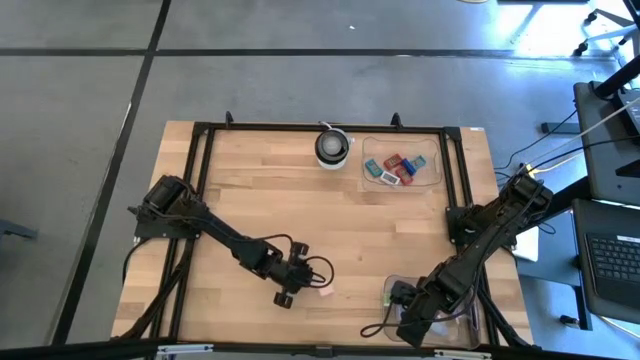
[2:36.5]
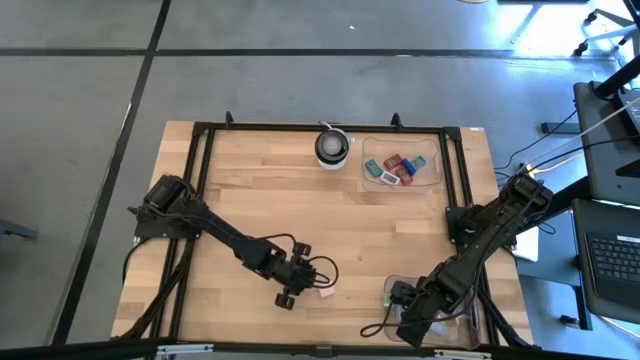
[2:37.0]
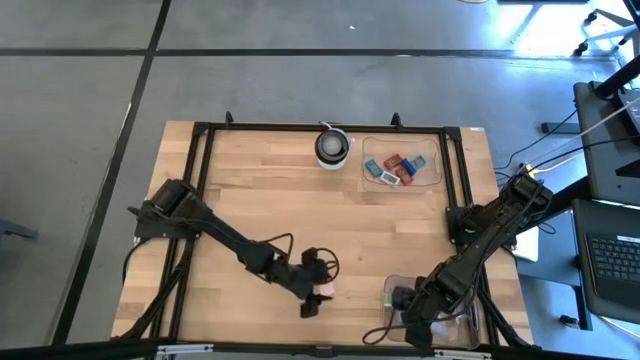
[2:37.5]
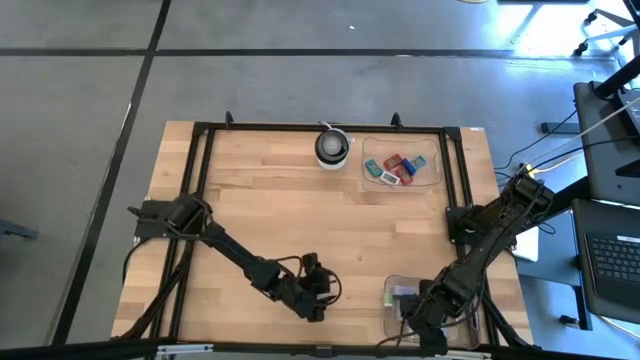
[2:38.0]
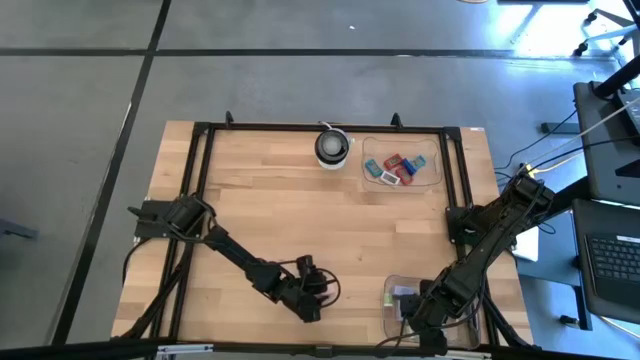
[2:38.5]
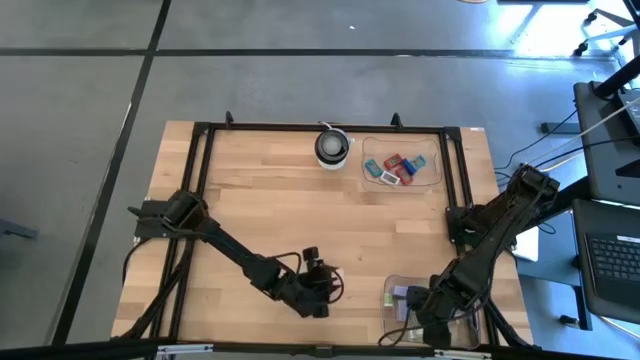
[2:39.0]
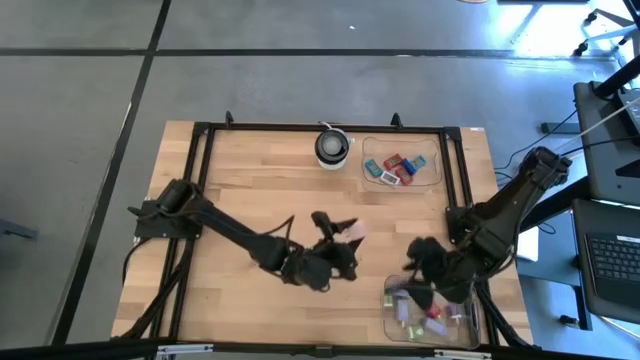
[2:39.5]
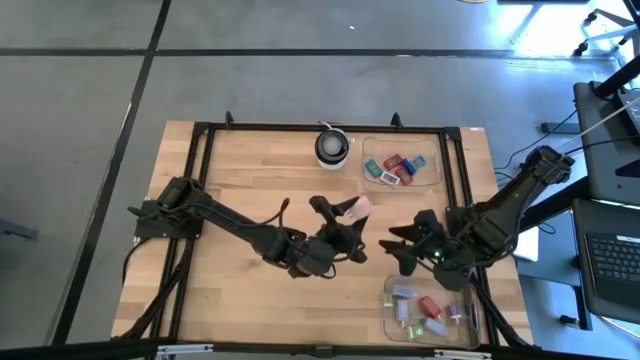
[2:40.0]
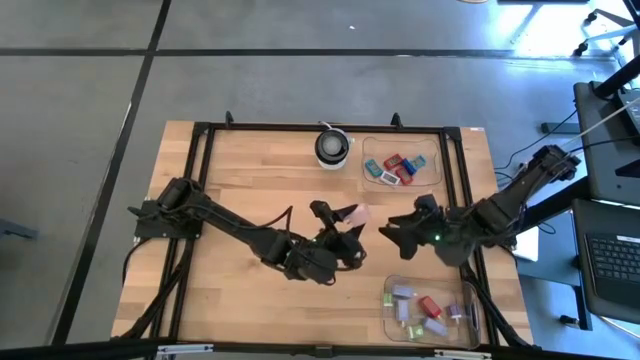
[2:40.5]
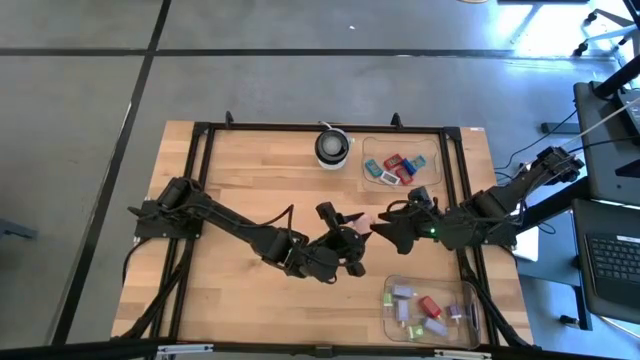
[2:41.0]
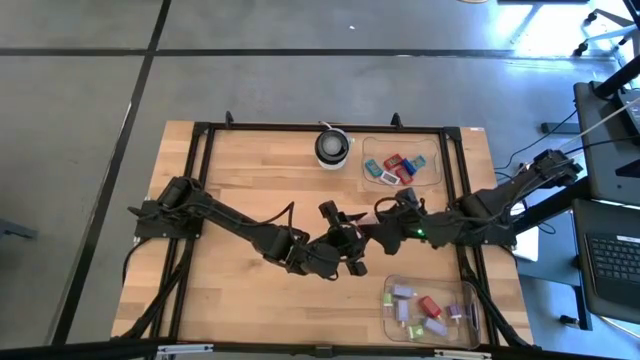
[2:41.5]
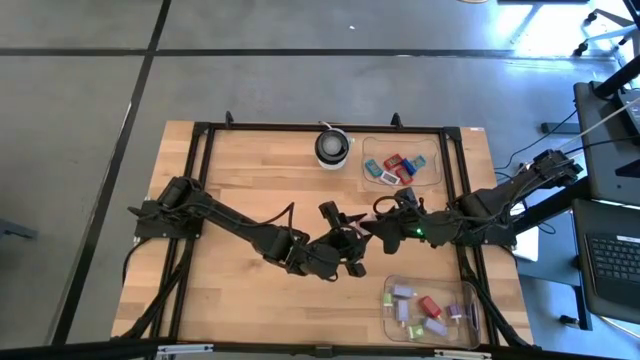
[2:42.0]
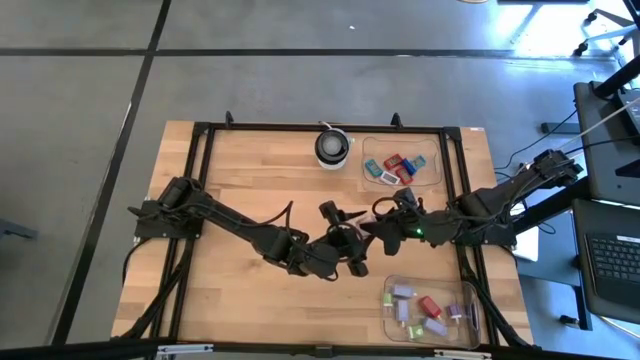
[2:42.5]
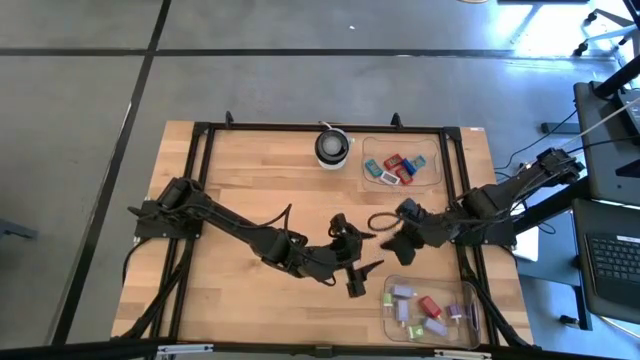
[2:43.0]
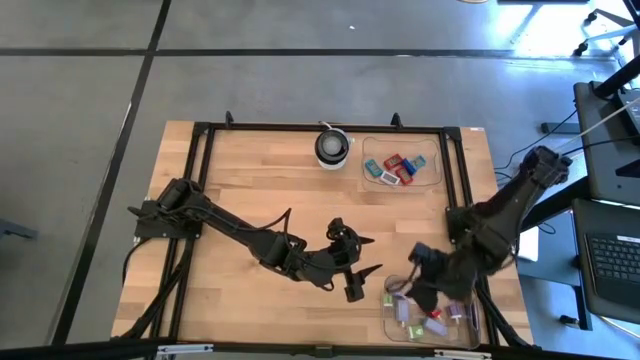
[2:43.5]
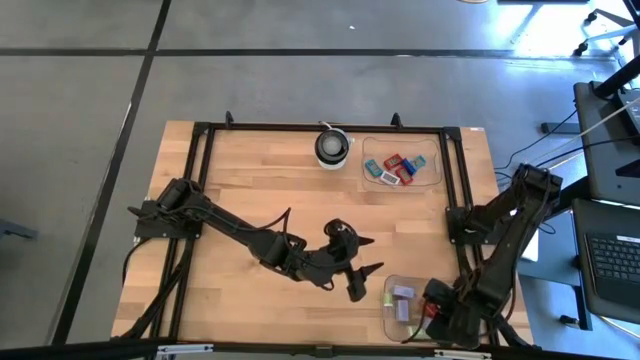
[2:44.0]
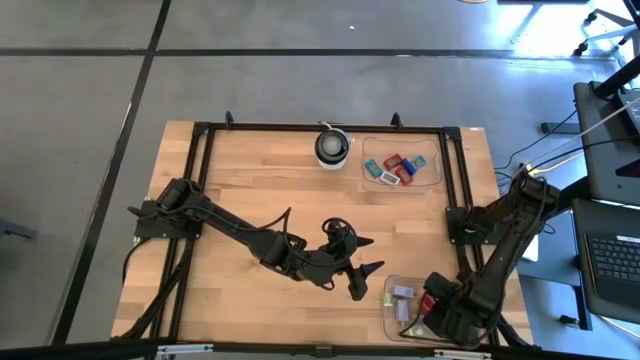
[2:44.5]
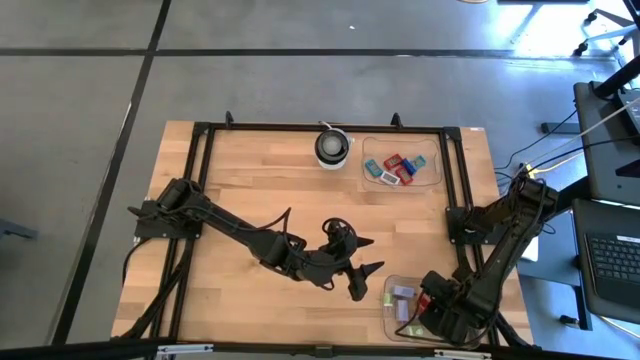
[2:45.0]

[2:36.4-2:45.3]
Task: Pick & Place Office items
Put the white charger adapter into the bottom transparent bin

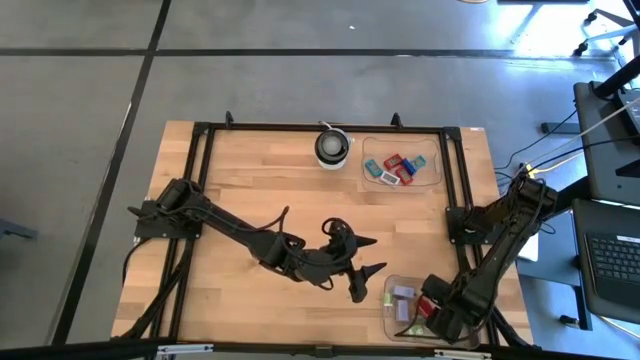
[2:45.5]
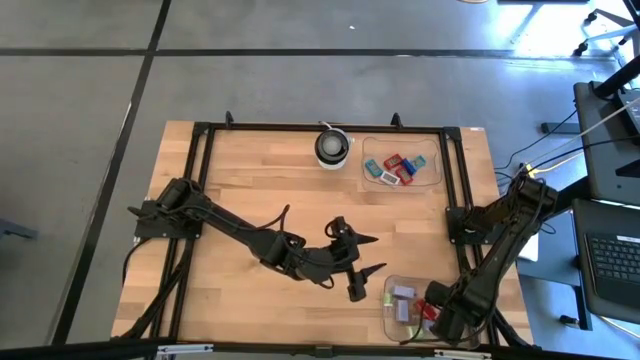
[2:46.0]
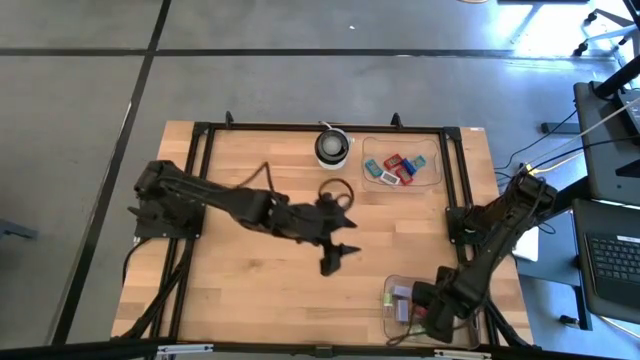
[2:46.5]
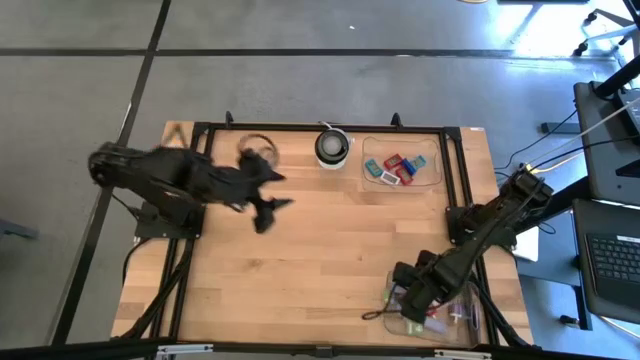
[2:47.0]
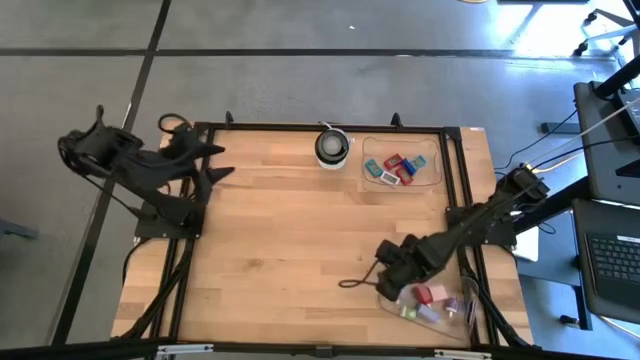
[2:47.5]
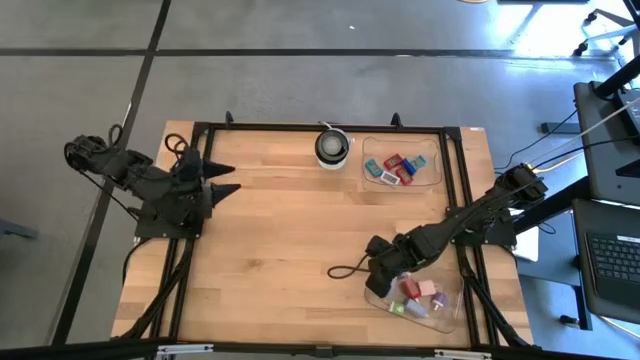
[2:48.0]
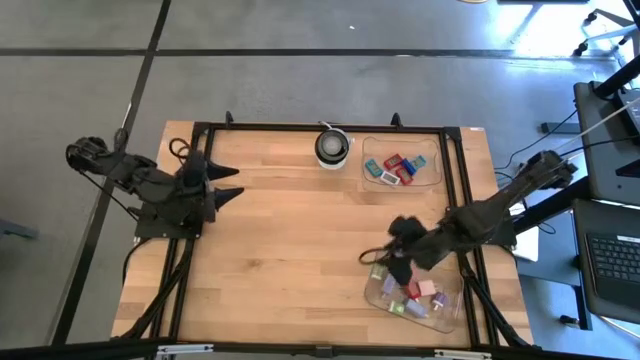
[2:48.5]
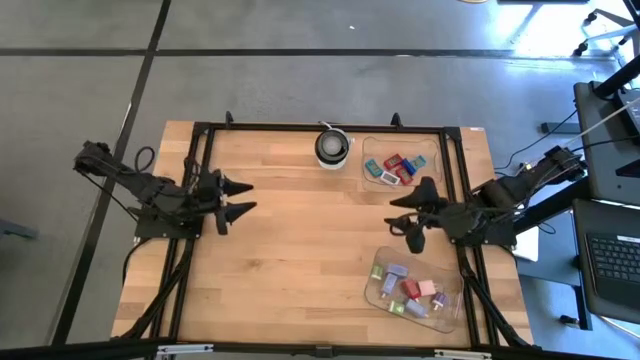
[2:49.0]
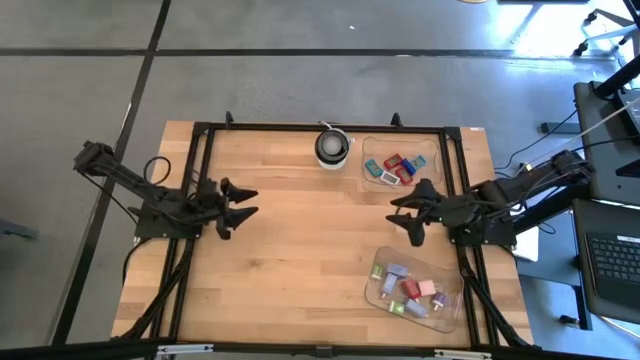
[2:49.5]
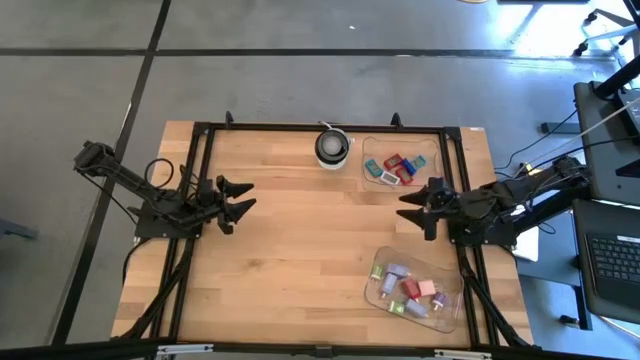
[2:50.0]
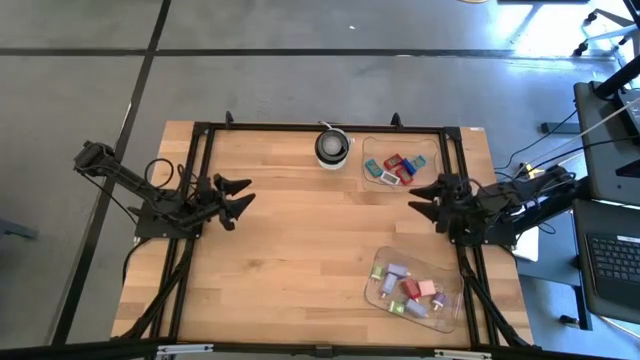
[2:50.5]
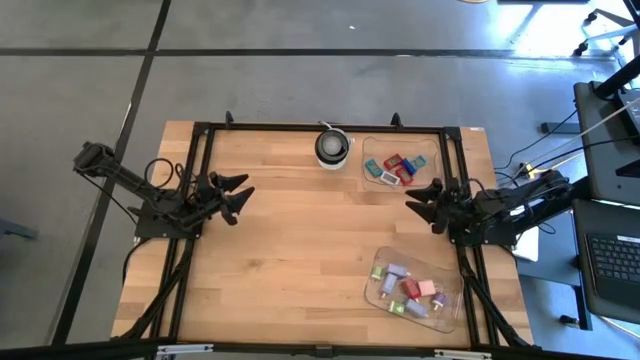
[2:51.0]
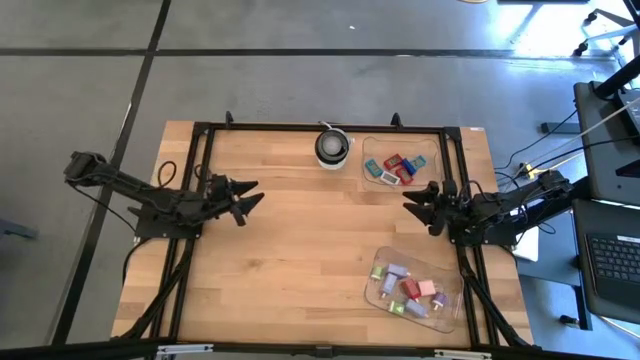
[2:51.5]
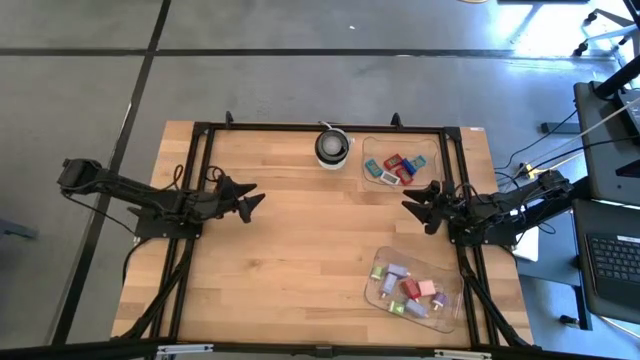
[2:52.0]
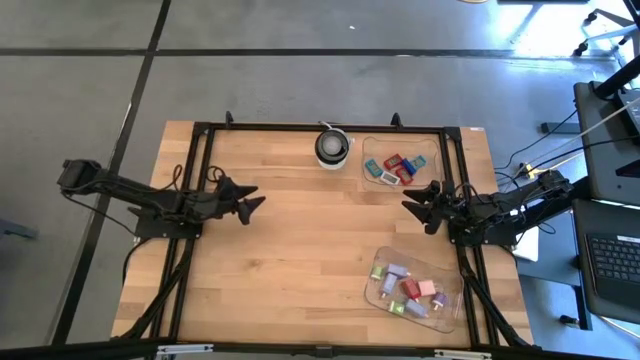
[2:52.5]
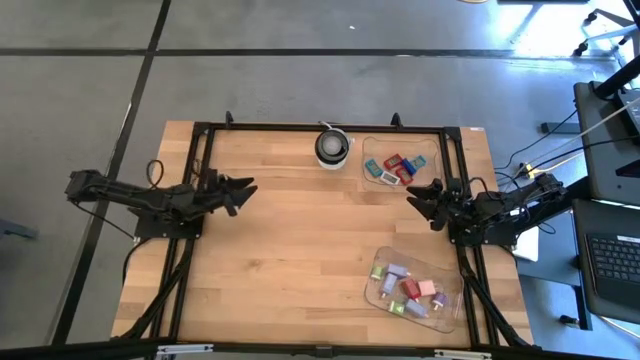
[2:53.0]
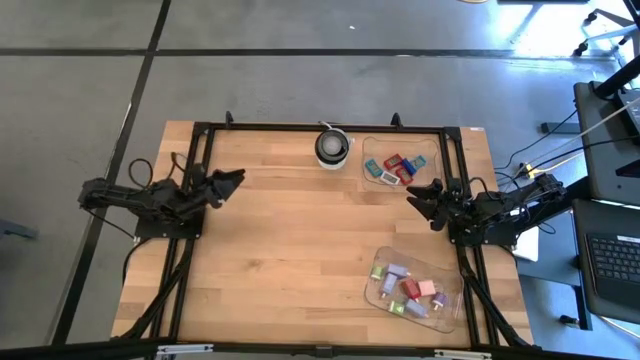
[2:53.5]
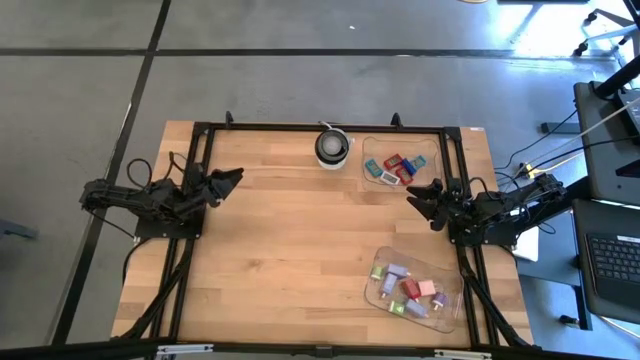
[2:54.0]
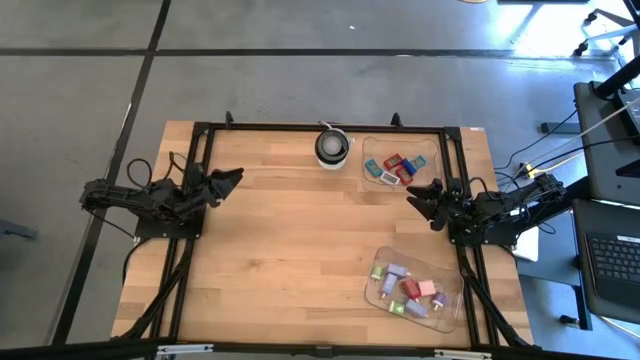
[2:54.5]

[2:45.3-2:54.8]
Return to Home Position

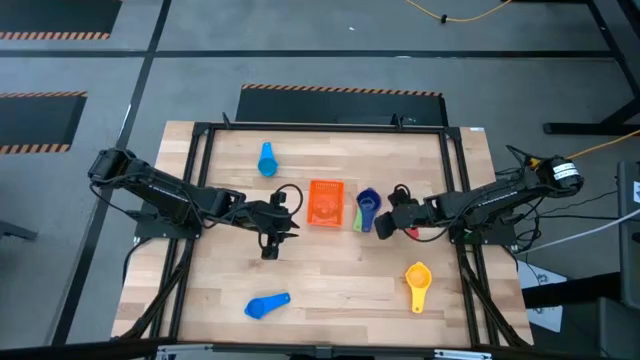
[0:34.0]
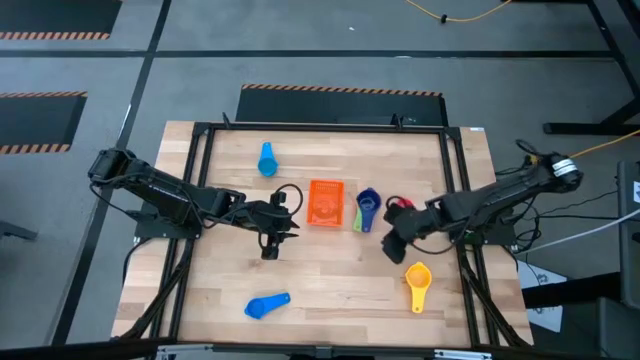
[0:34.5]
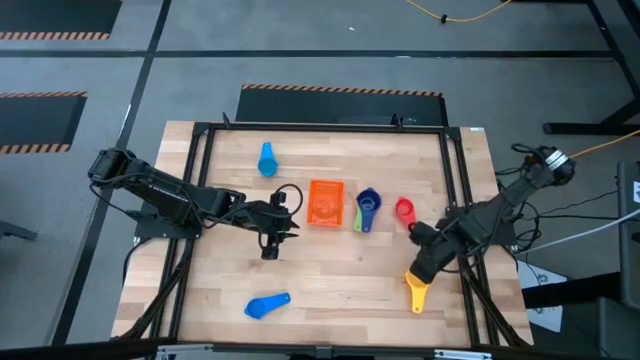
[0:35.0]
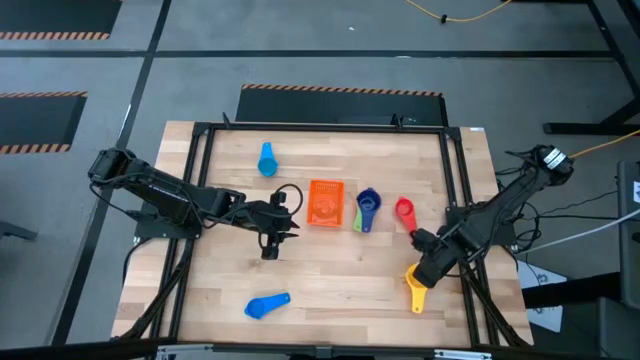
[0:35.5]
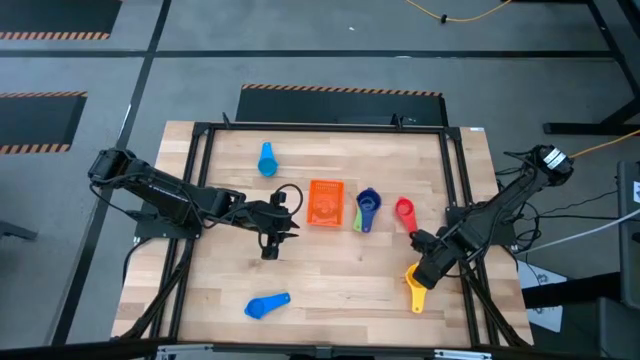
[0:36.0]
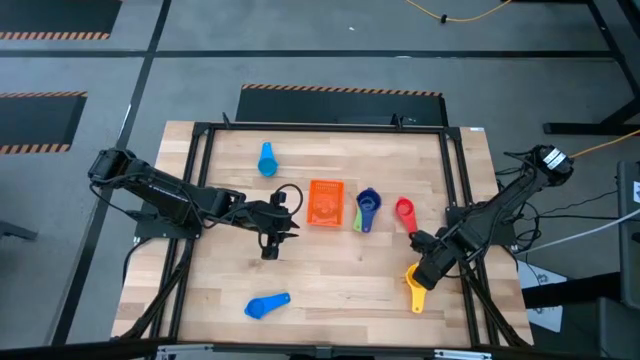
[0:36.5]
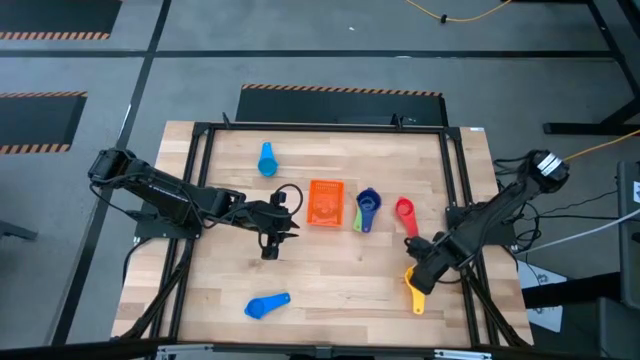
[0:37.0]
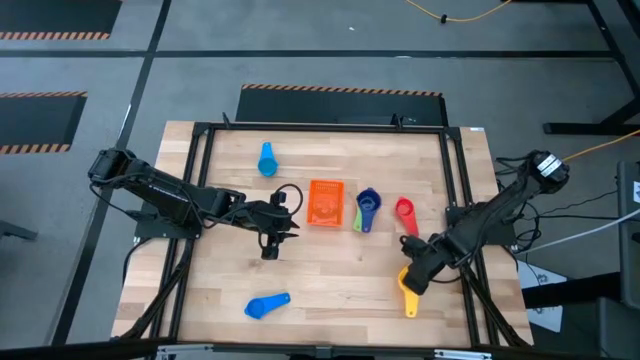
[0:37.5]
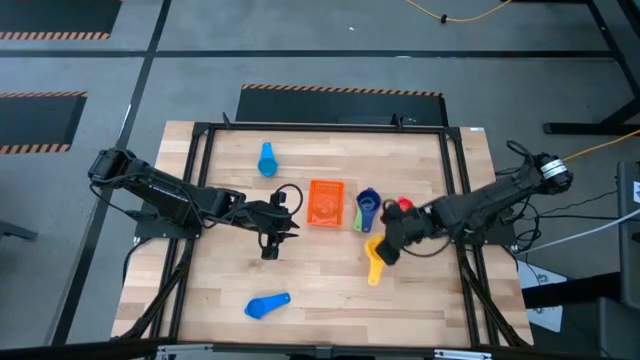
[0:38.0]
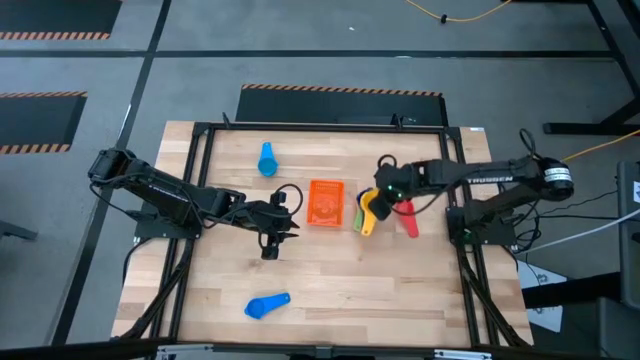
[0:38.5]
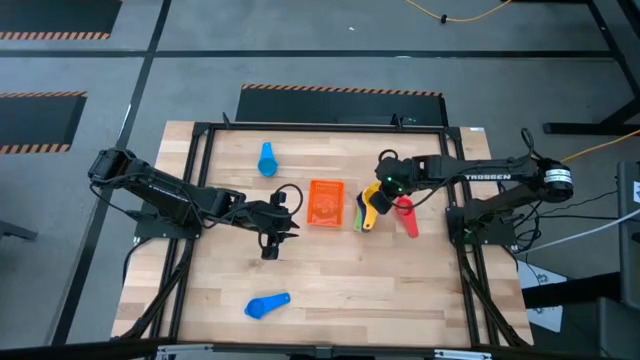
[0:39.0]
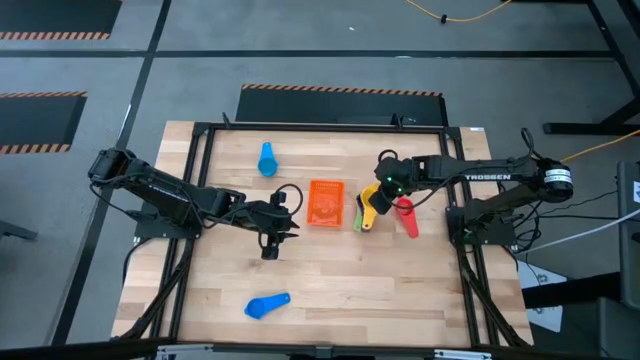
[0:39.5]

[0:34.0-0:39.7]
Task: Nest measuring cups in basket
Stack the yellow measuring cup on top of the dark blue measuring cup
